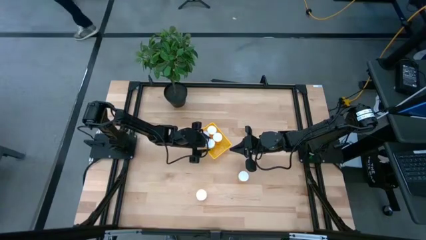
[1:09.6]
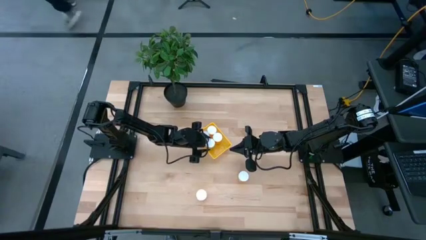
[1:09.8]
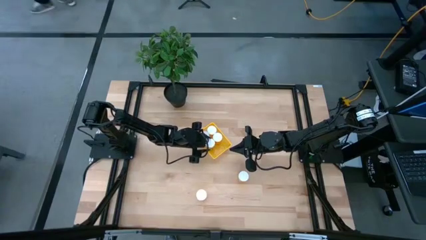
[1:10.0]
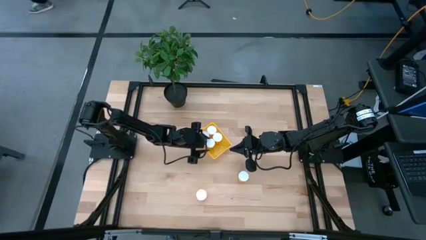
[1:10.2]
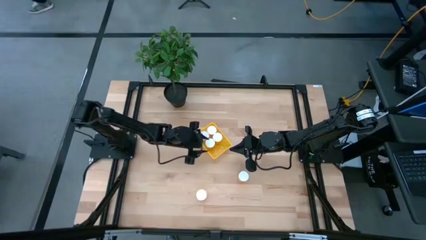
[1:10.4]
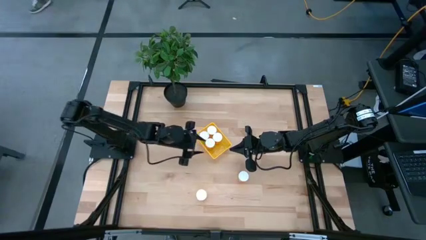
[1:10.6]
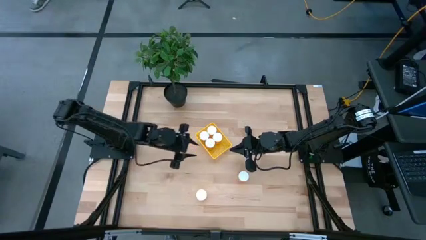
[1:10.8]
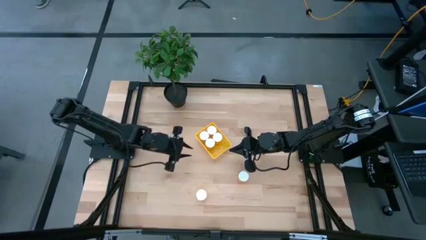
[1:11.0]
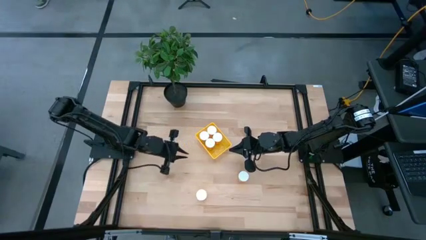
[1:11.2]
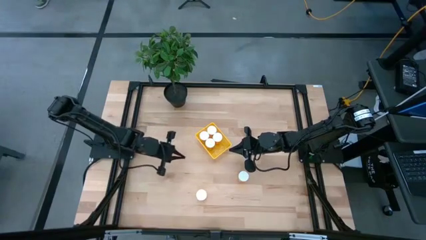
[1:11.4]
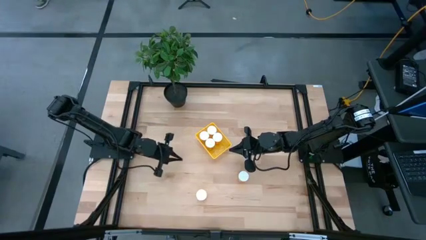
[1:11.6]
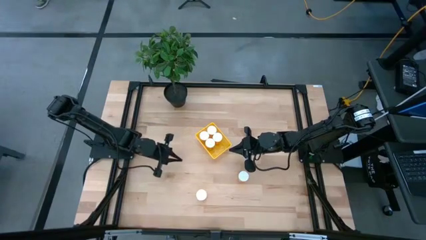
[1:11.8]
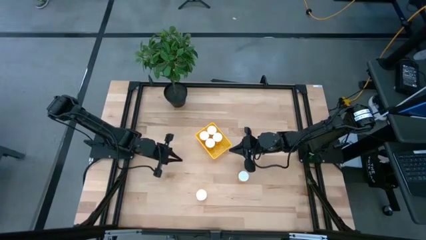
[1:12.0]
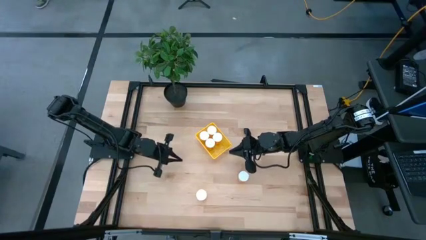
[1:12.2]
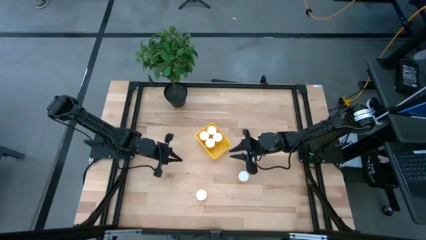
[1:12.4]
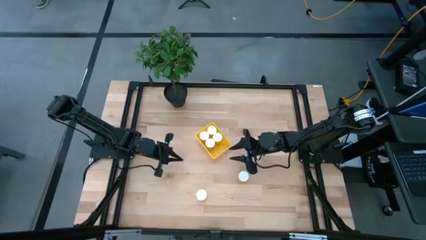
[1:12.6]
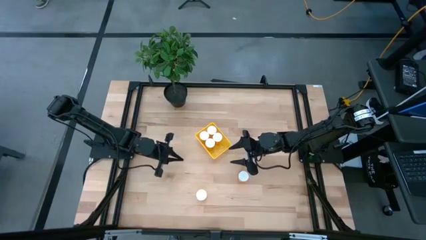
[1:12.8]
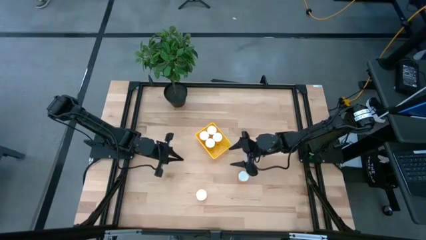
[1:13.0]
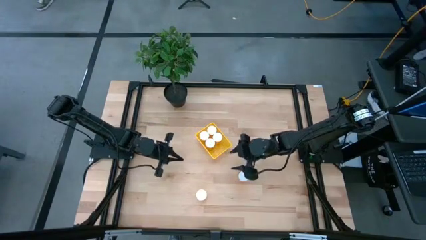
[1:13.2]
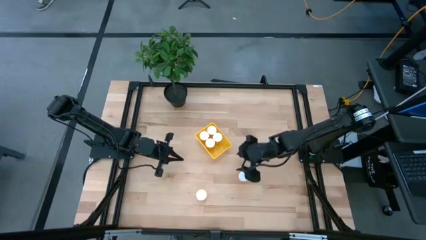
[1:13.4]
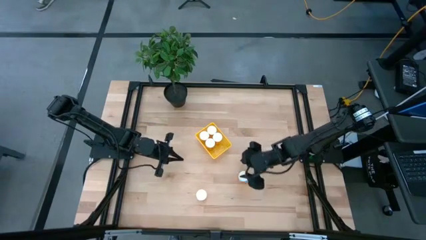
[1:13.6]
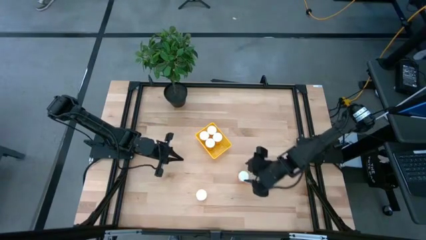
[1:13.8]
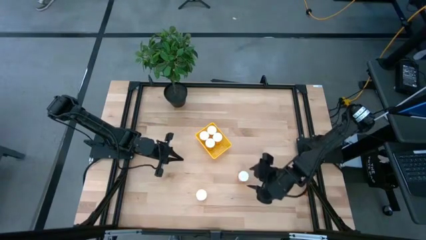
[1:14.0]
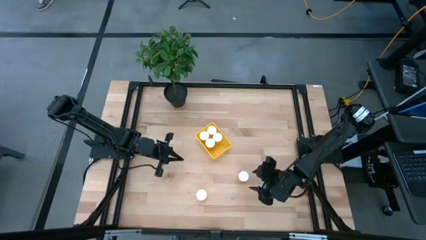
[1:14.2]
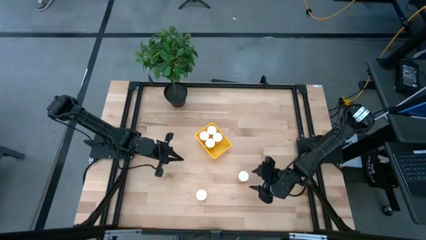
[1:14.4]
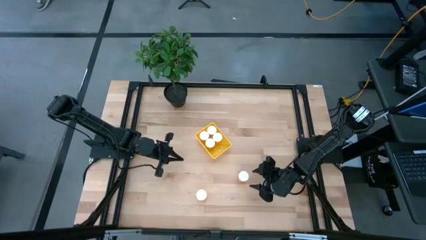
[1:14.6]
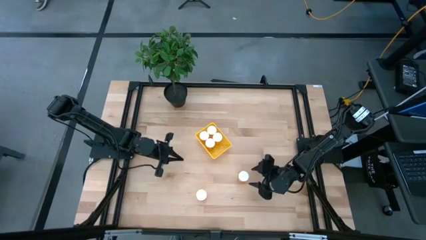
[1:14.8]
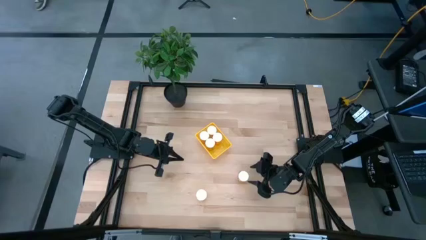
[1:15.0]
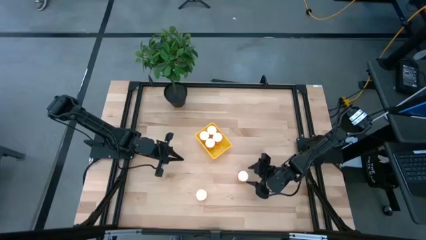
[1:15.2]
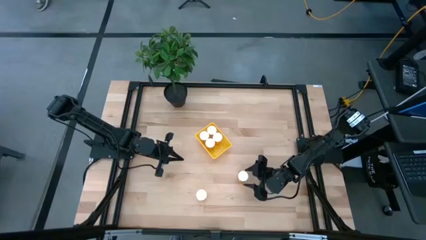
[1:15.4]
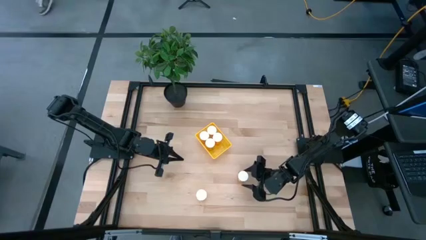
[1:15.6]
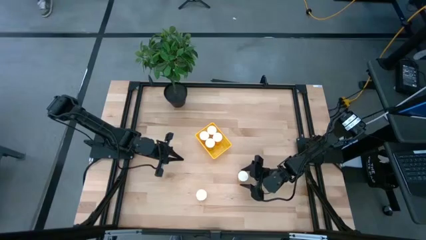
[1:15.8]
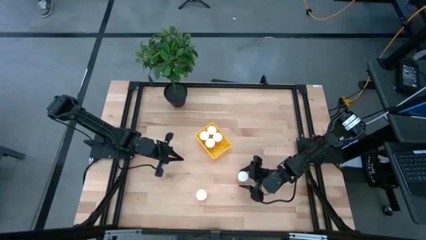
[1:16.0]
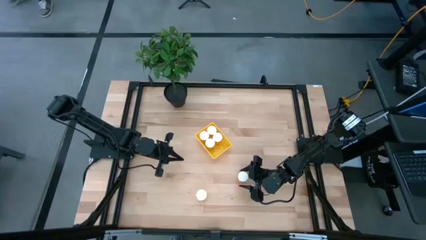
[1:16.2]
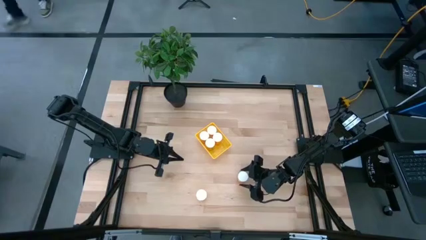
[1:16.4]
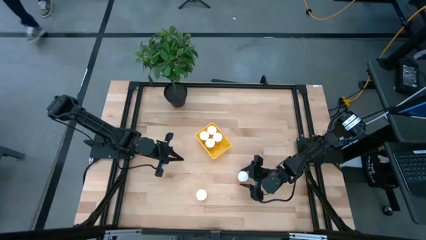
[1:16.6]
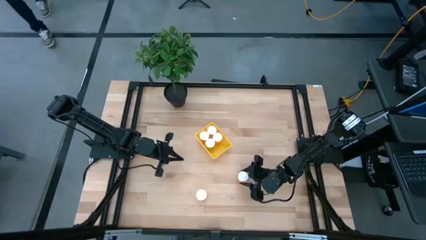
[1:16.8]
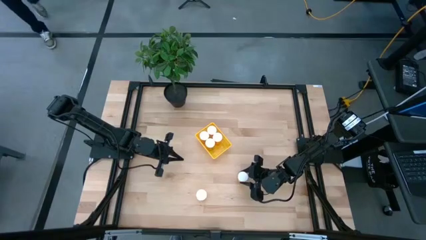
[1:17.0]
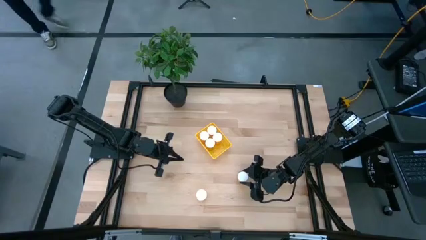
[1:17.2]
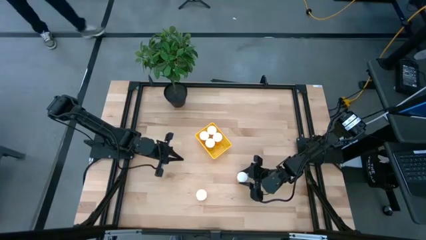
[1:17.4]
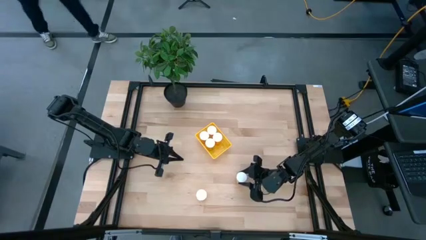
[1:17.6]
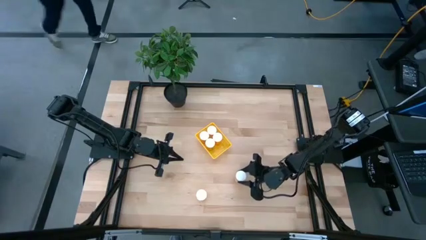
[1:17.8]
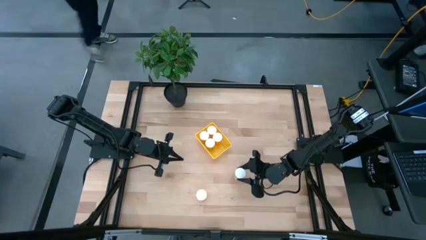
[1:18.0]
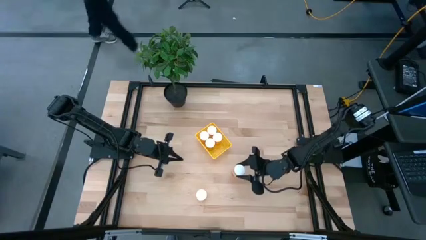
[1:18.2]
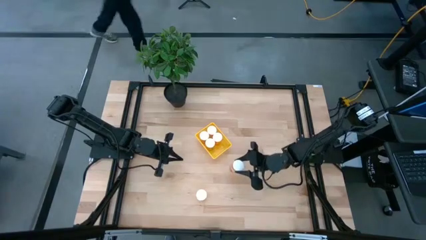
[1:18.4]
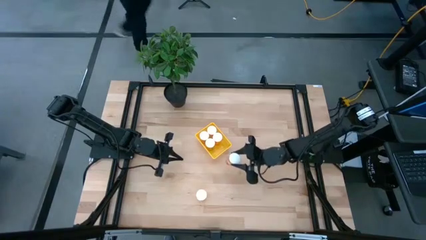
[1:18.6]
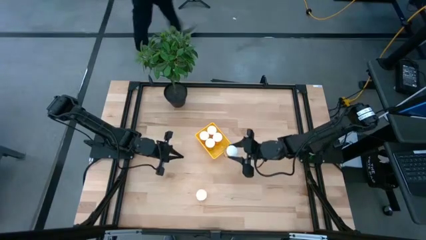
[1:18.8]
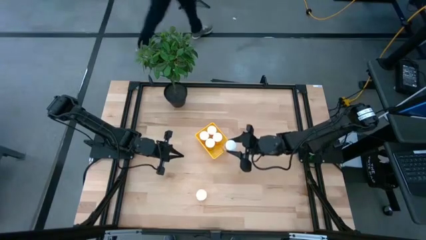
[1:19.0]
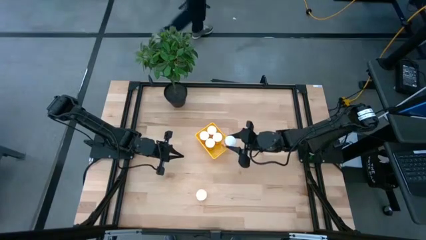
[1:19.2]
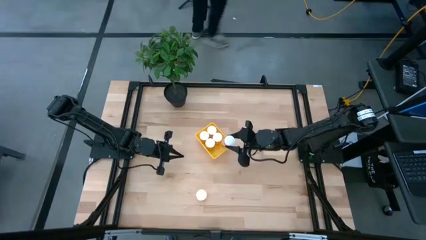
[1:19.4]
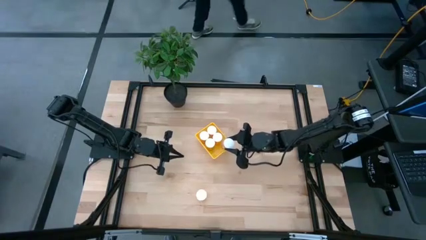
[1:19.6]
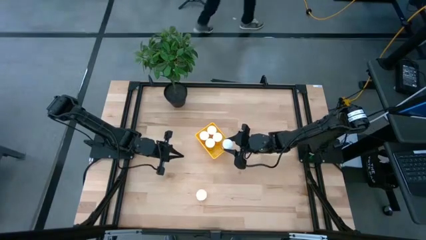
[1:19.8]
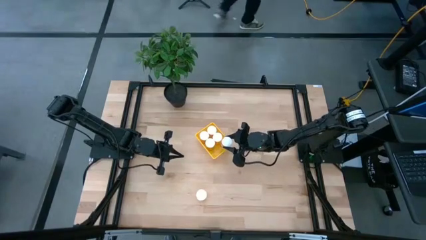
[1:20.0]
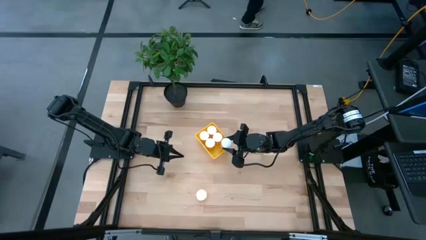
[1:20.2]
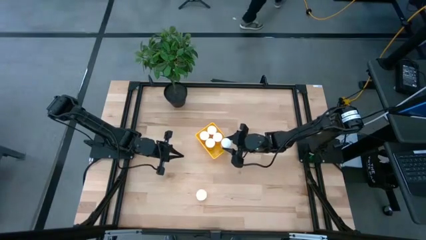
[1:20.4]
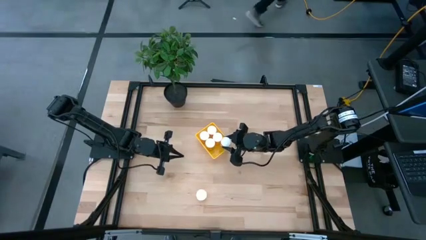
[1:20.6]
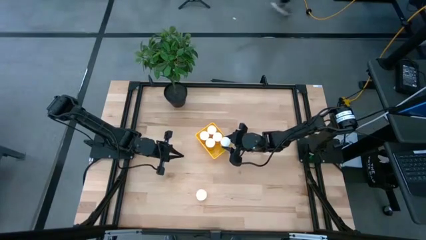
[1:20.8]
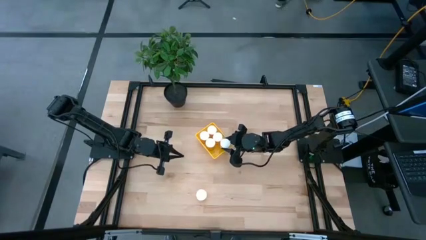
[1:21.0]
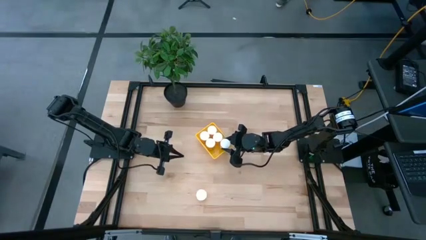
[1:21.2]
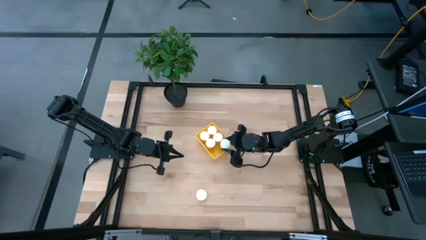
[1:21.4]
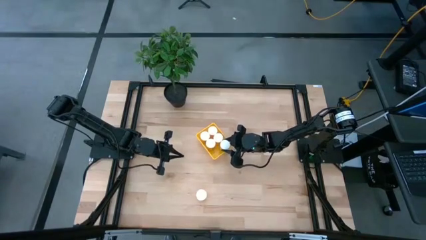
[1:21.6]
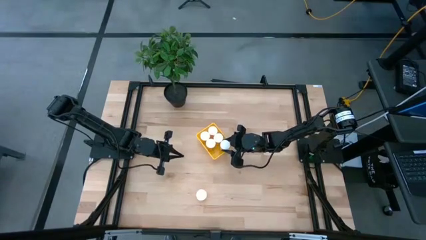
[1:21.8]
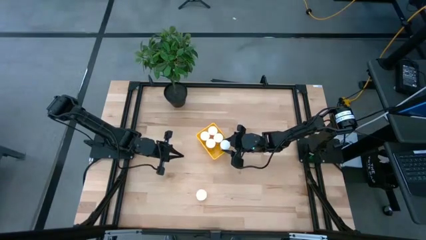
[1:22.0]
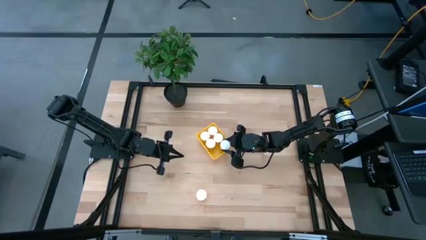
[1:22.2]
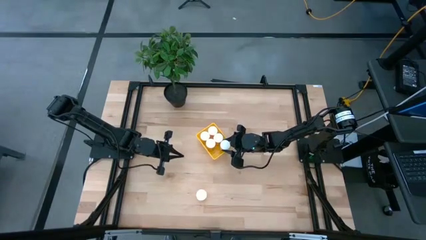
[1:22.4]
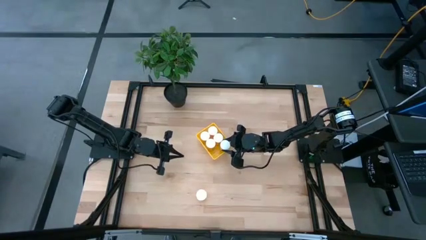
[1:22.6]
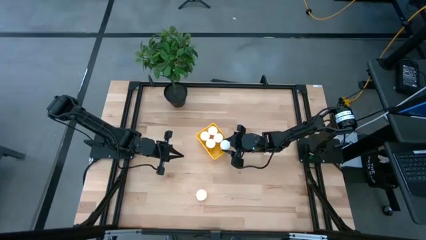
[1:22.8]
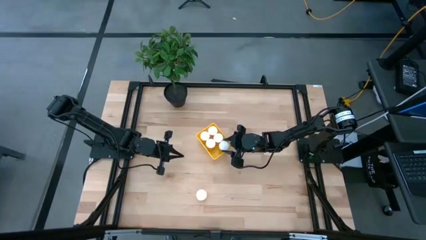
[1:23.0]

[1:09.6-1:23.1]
Task: Pick and place pill bottles into a basket
Put the top pill bottle into the bin

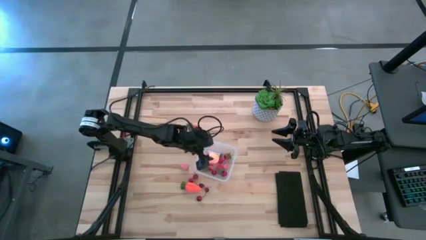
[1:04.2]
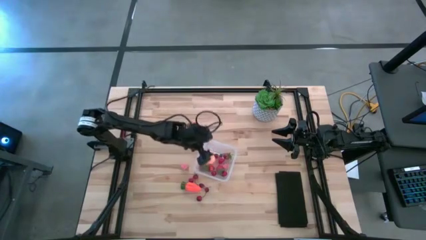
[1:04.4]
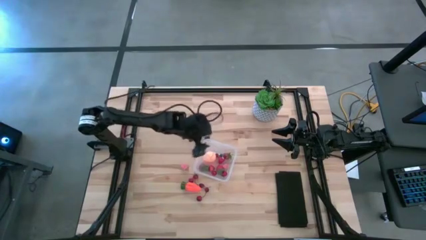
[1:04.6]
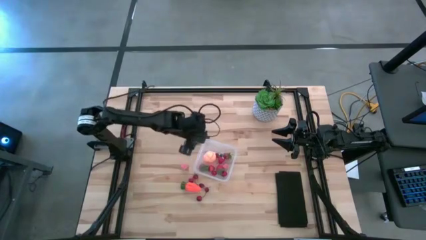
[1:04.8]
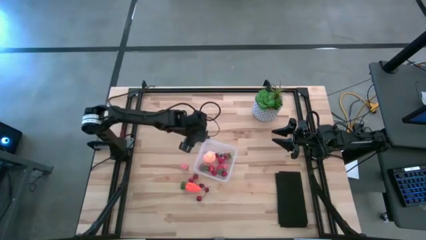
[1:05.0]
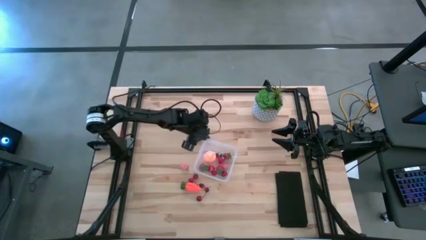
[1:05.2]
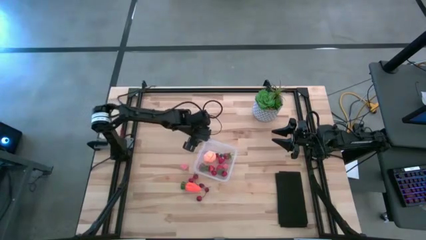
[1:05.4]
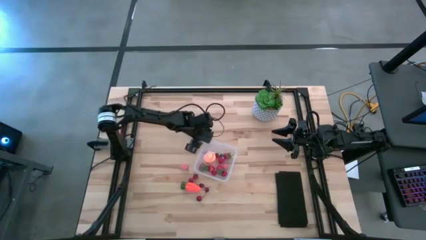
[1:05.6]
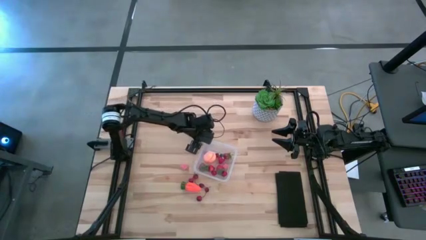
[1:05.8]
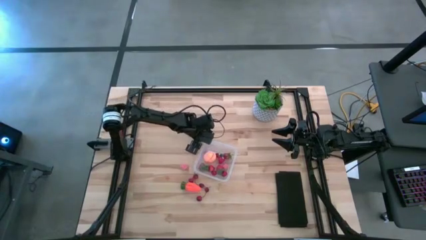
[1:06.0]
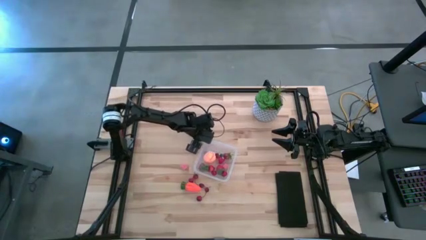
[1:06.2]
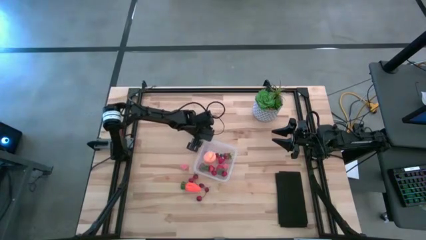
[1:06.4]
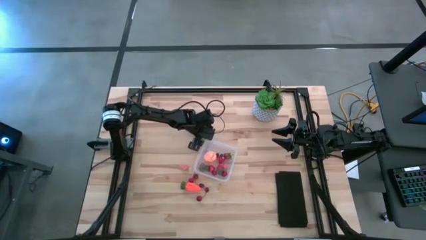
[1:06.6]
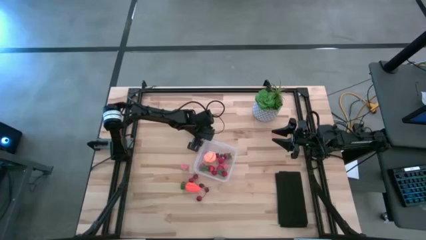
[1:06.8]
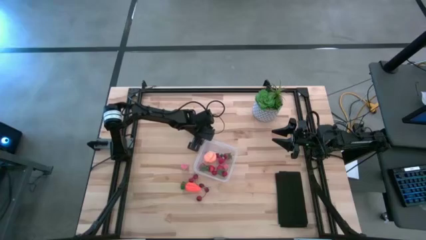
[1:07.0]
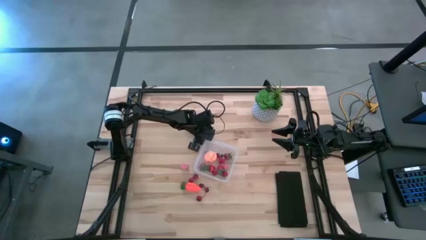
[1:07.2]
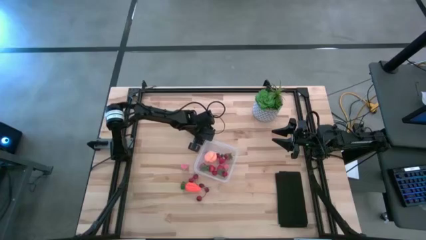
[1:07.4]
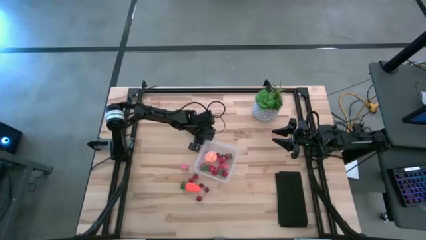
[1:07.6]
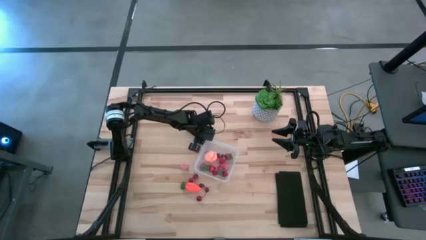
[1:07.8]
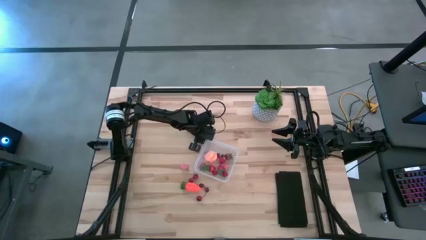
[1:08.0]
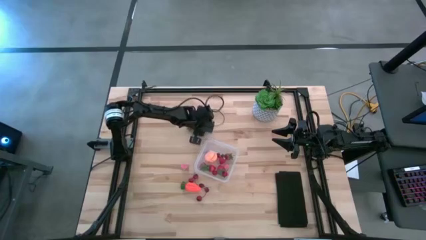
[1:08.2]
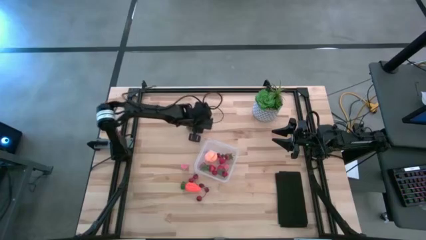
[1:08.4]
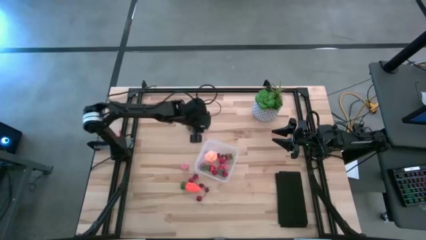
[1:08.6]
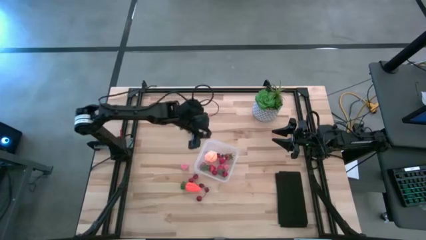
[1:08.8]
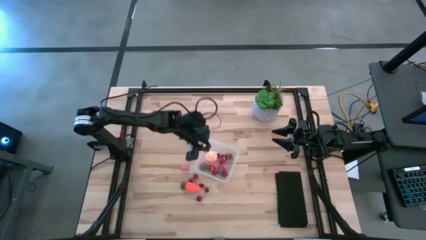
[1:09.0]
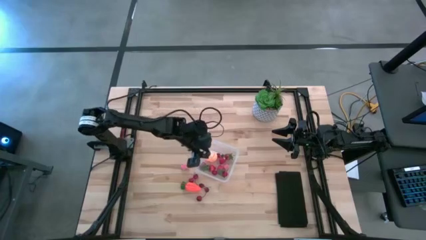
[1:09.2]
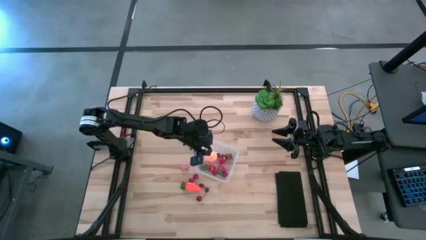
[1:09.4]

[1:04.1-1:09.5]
Task: Pick and placing Produce into tupperware
Put the black raspberry into the transparent container
